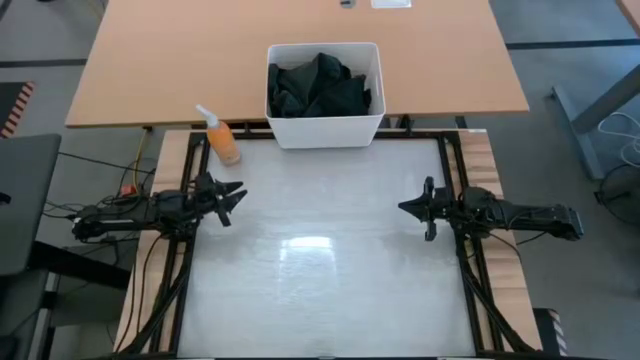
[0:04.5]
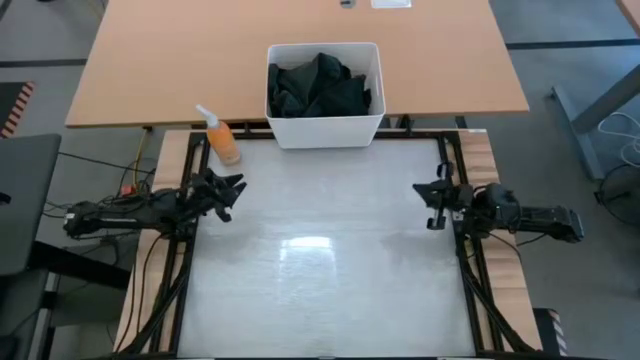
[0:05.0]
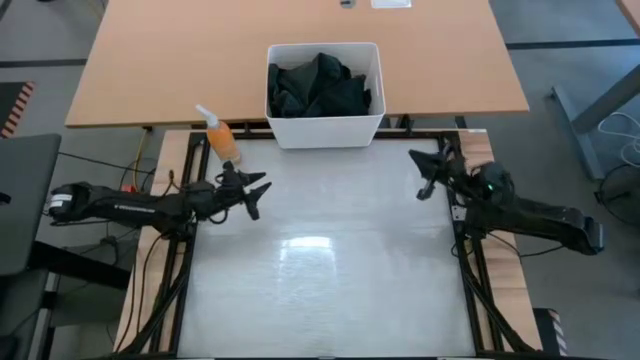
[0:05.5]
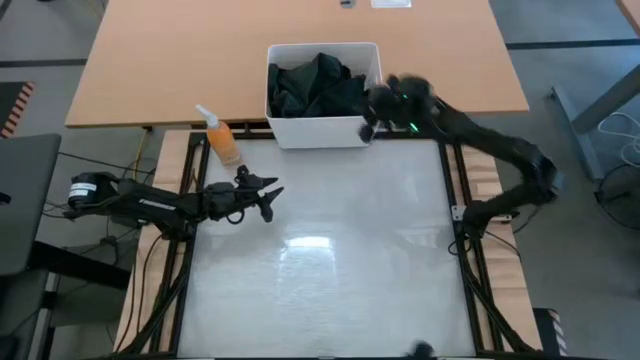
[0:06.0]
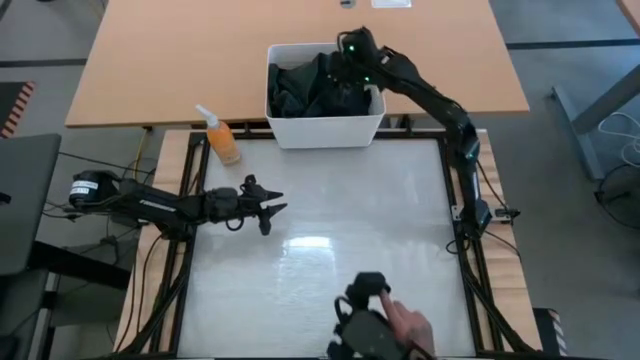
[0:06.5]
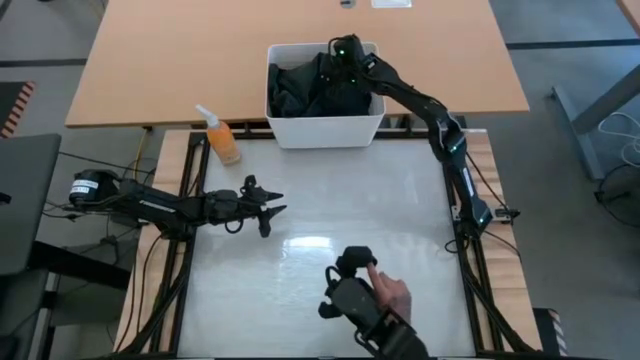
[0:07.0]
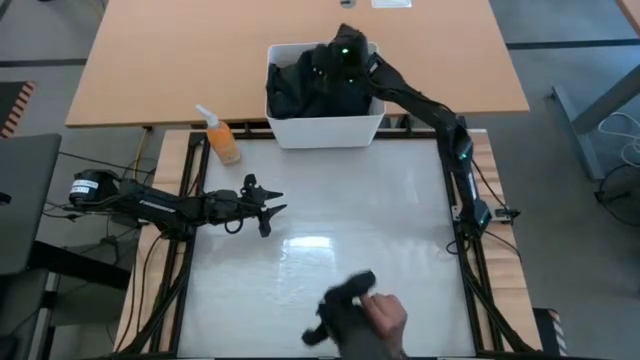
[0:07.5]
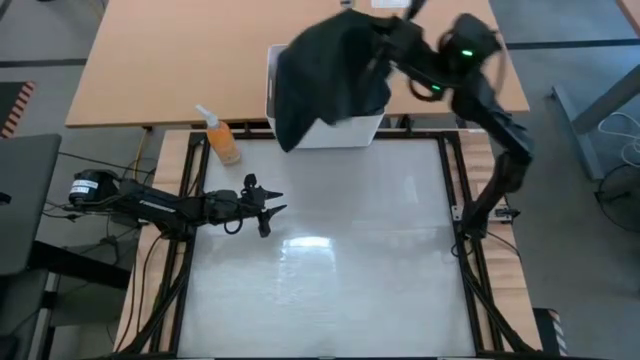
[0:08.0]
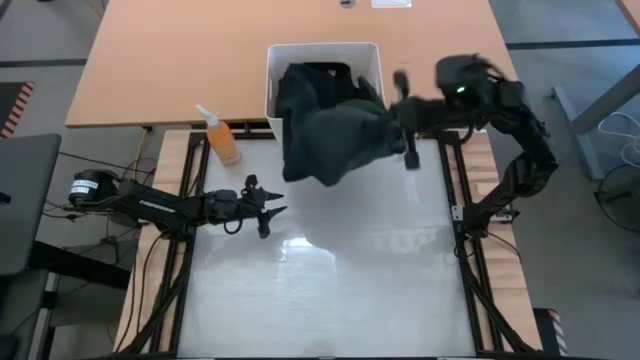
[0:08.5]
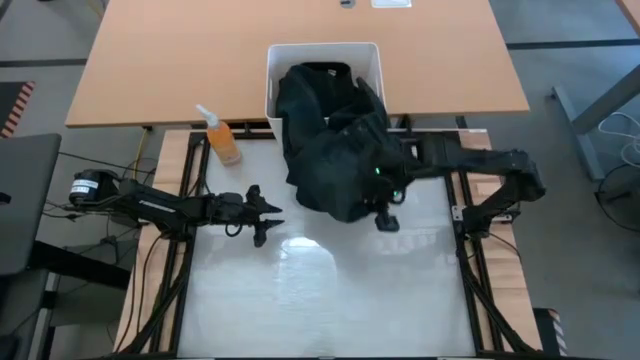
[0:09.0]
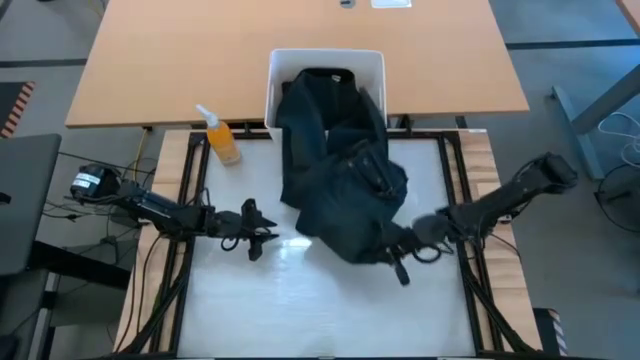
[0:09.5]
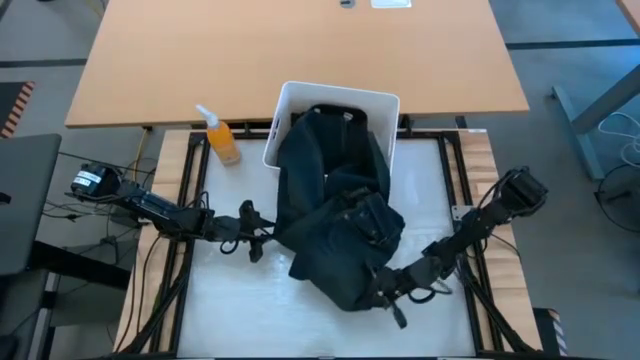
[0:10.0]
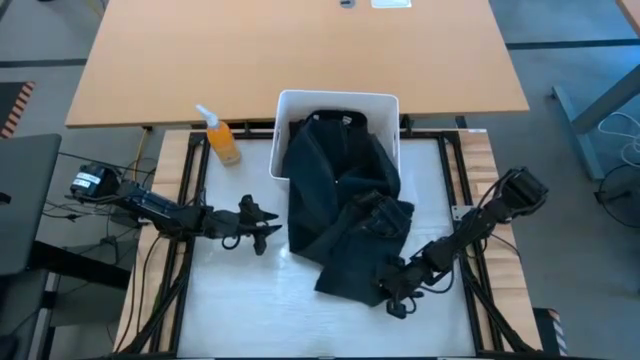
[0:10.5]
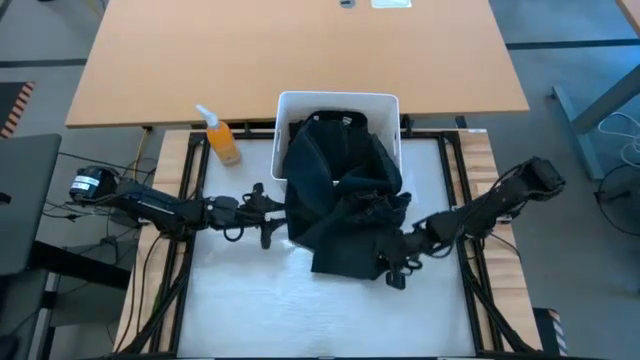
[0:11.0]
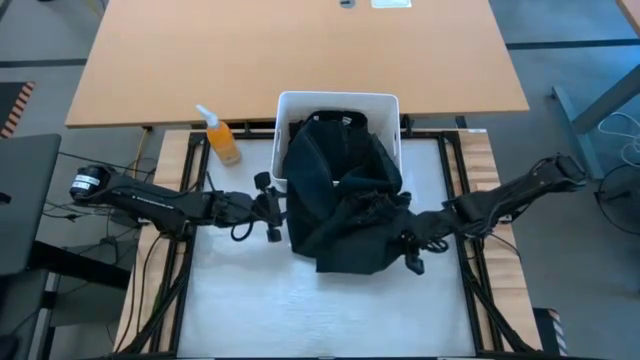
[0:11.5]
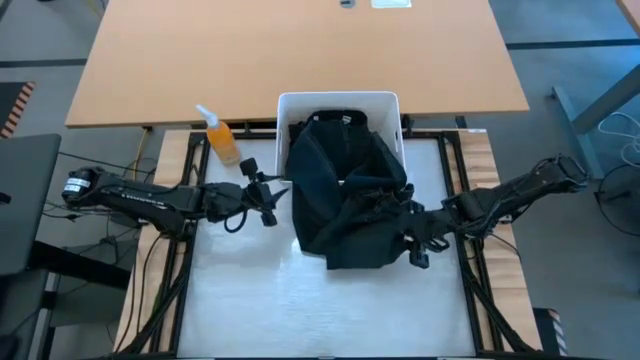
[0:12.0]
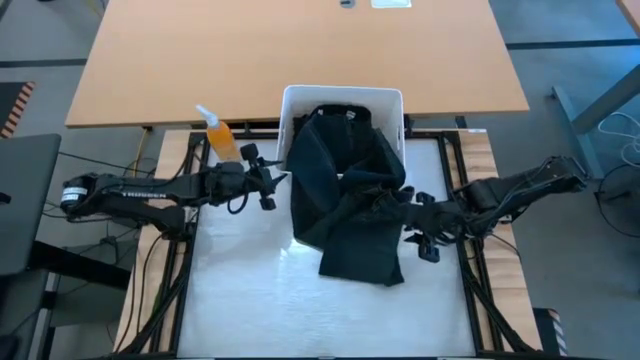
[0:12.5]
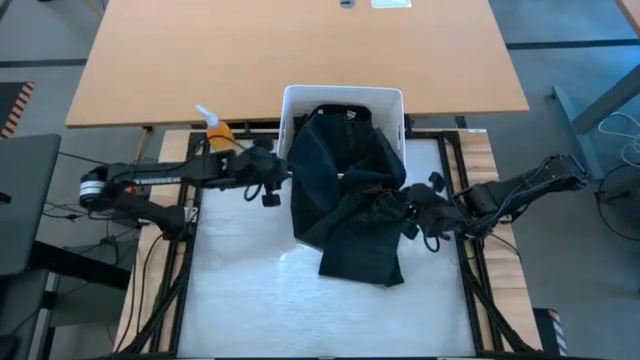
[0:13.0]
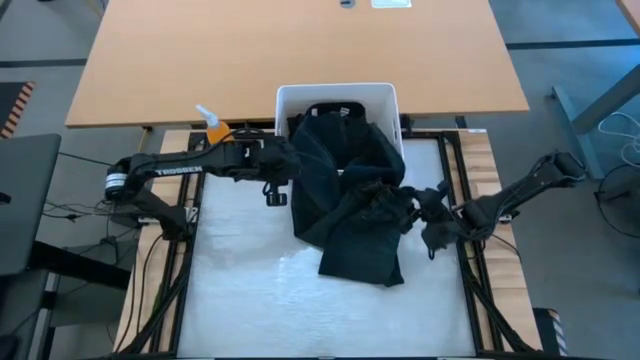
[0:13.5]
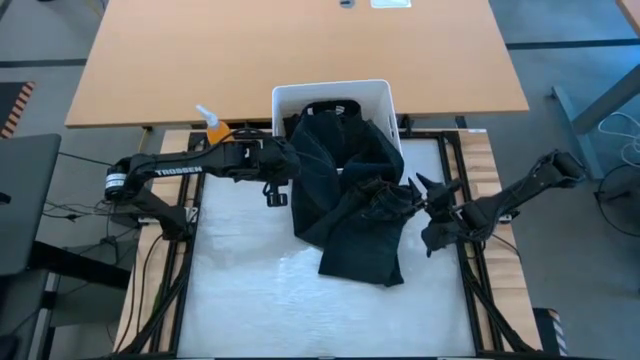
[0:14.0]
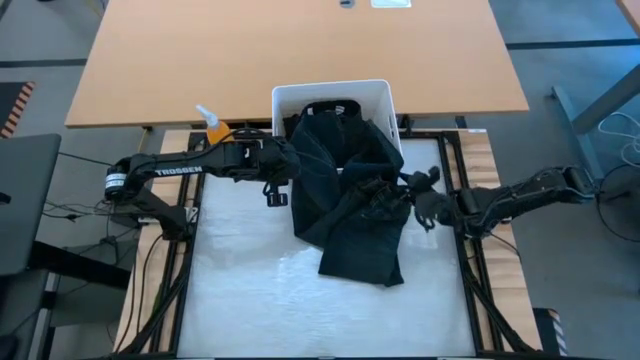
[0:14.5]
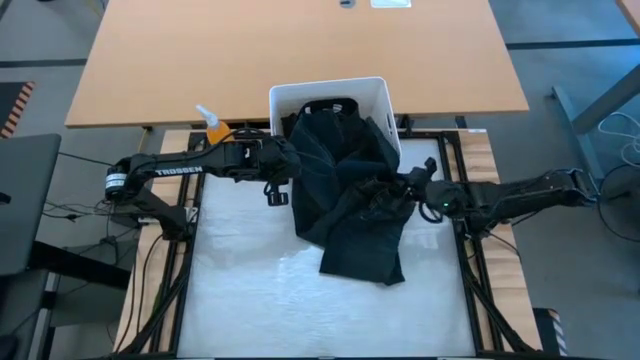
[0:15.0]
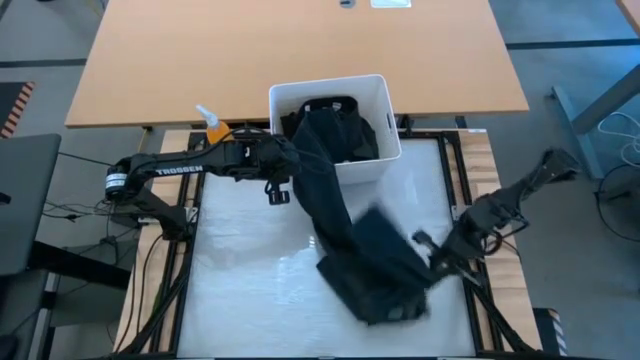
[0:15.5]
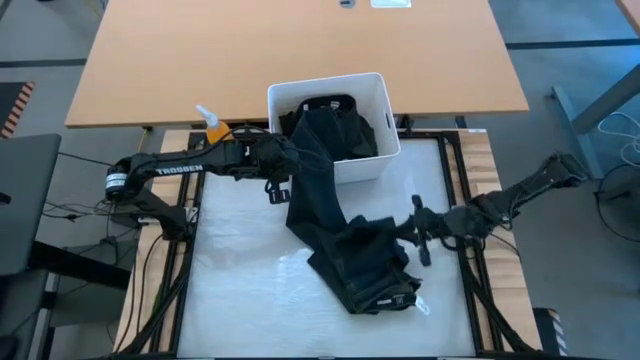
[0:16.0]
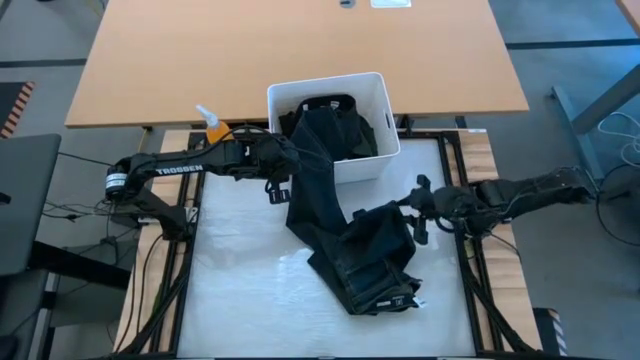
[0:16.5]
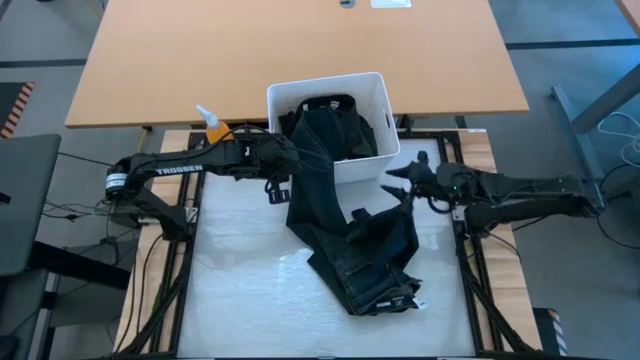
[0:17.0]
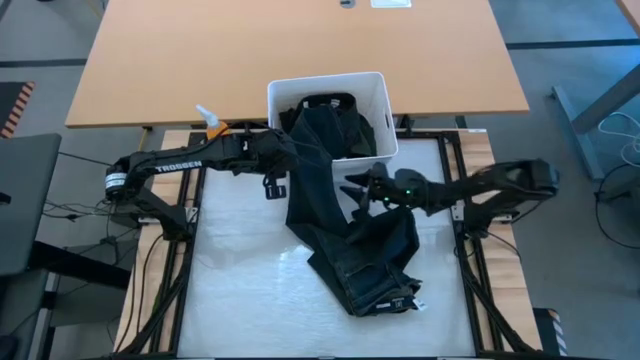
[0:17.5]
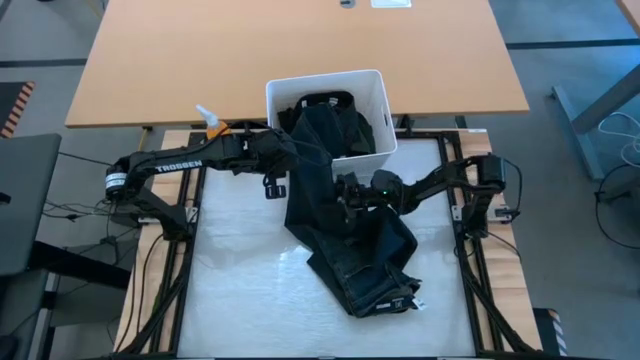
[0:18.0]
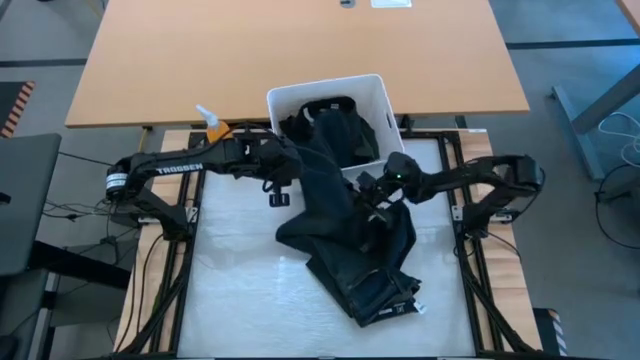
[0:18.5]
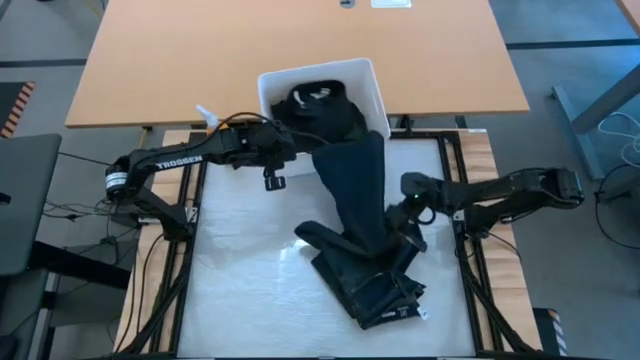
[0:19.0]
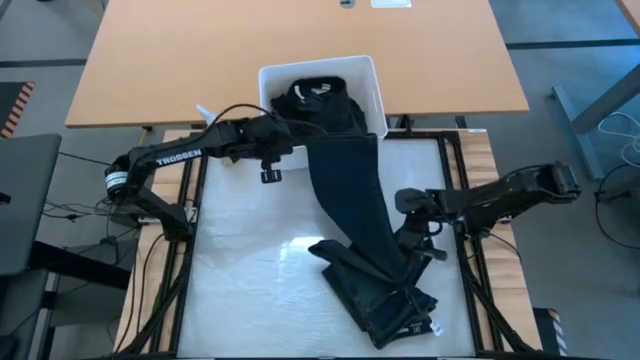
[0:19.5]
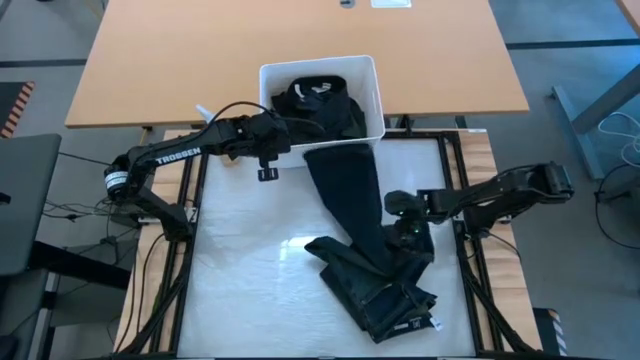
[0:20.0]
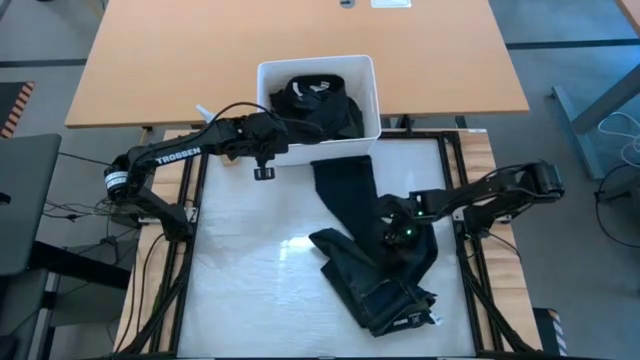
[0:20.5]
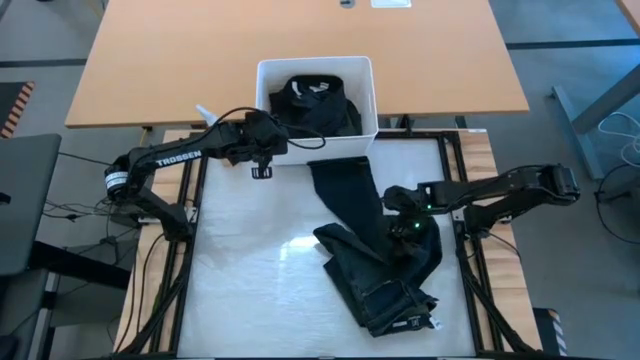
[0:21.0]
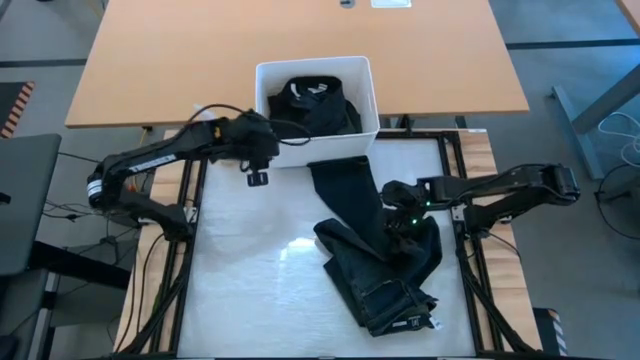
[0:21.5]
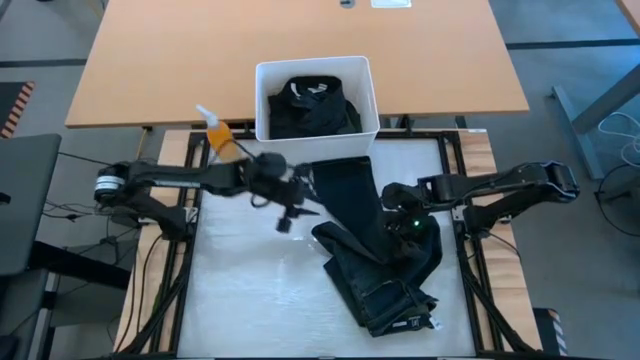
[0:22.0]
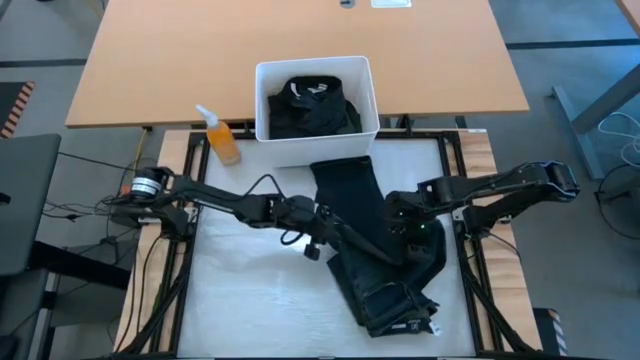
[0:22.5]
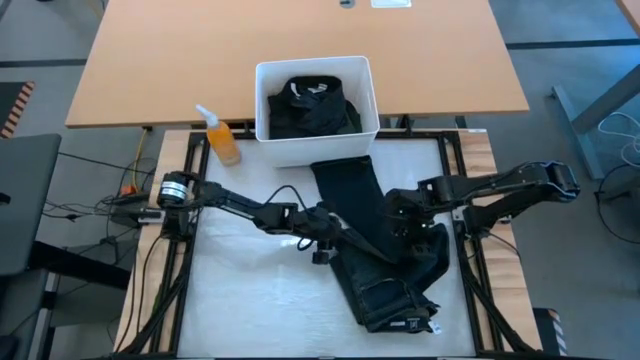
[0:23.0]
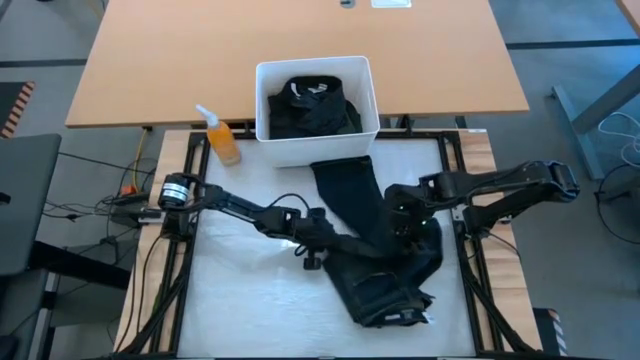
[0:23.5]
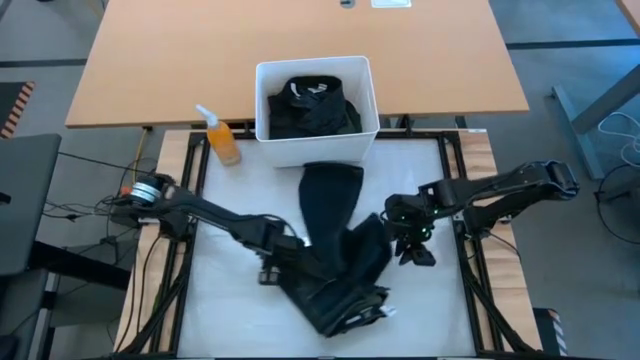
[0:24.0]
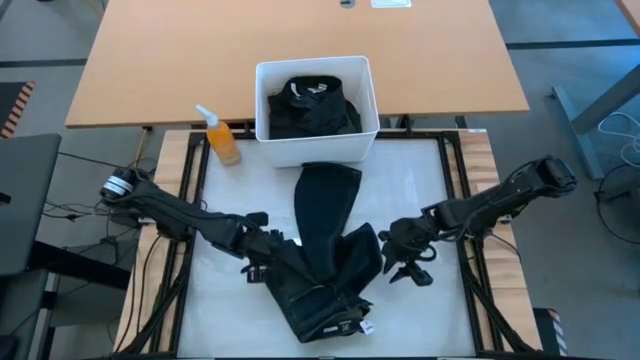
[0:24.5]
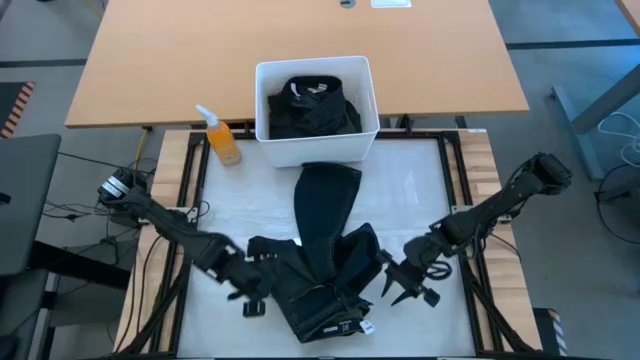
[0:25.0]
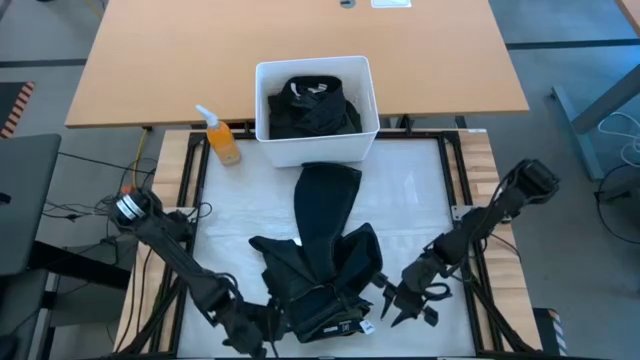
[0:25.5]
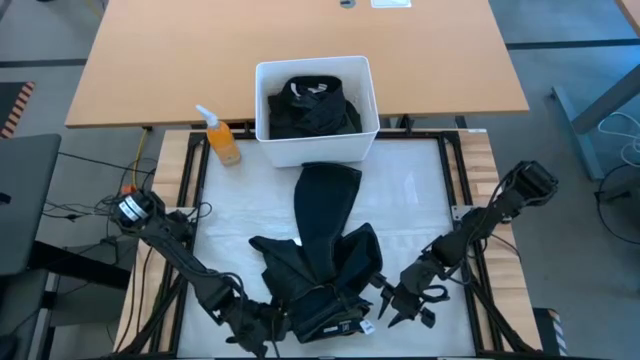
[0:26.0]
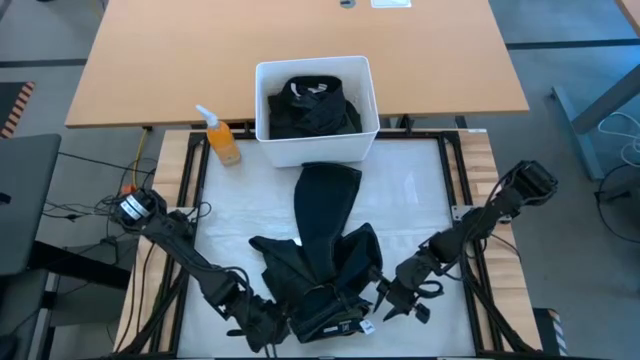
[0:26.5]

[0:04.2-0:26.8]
Task: Fold laundry
Fold the dark blue jeans from the white laundry organizer
